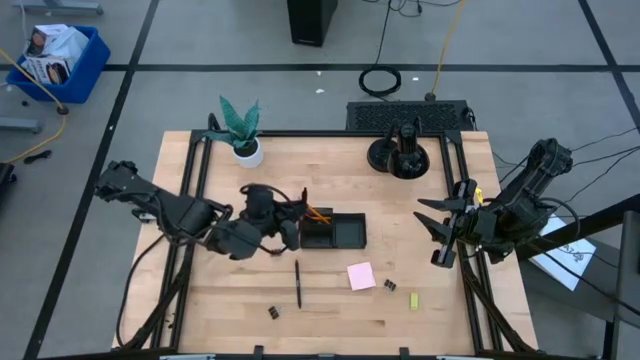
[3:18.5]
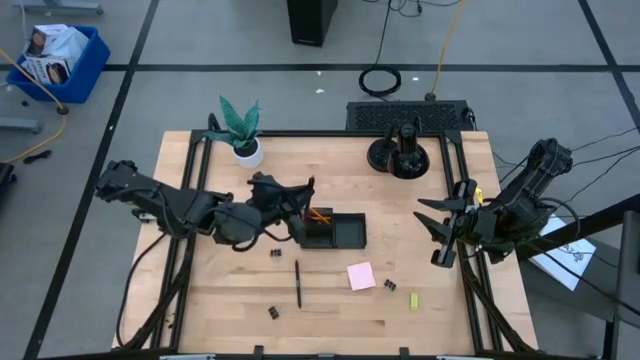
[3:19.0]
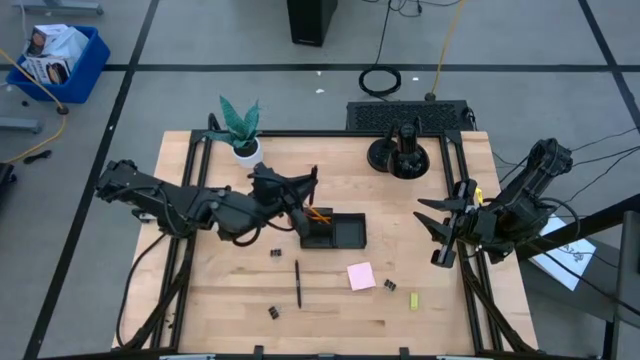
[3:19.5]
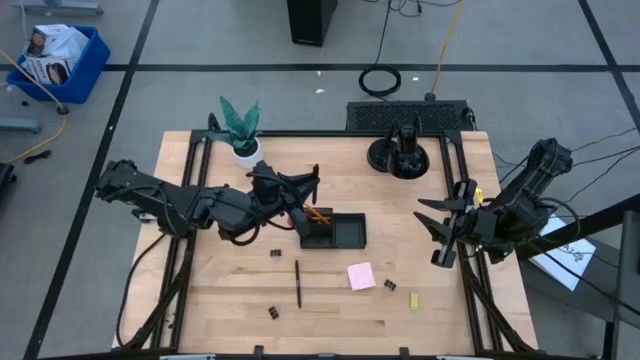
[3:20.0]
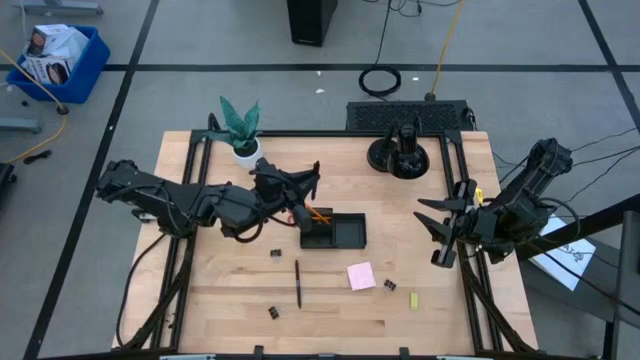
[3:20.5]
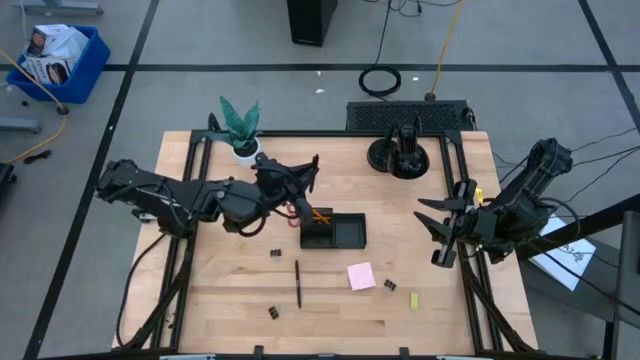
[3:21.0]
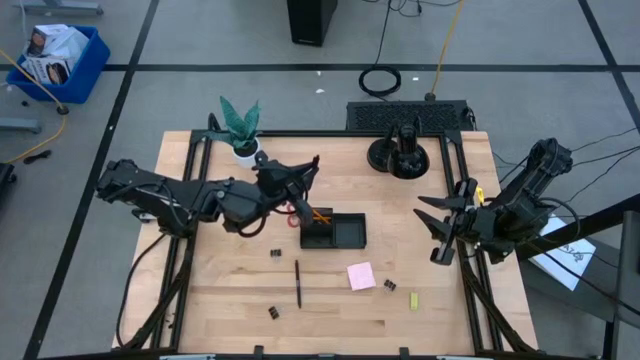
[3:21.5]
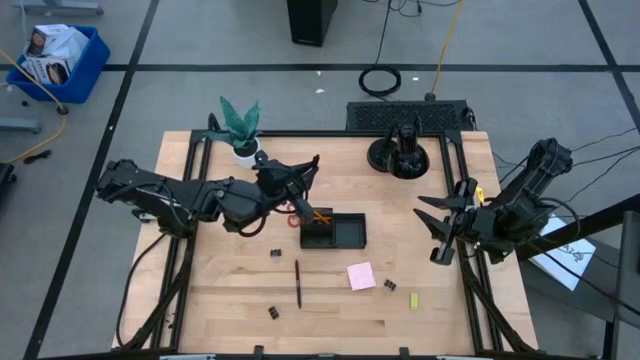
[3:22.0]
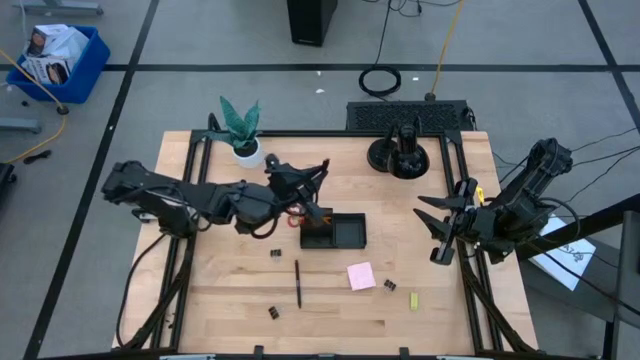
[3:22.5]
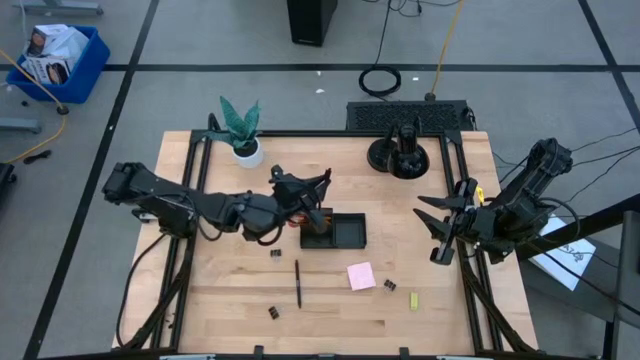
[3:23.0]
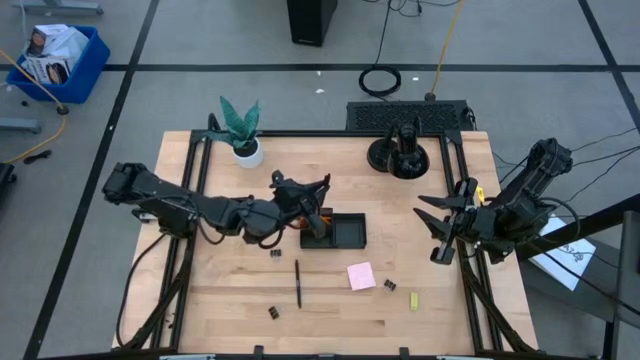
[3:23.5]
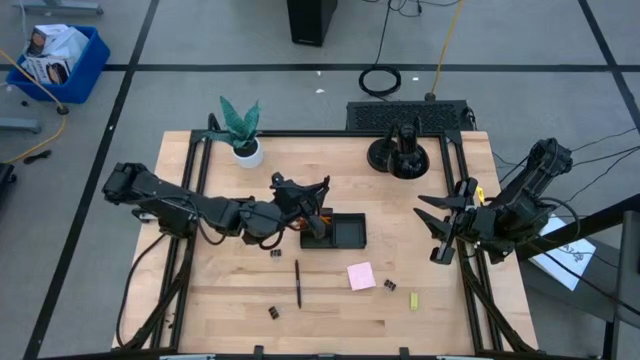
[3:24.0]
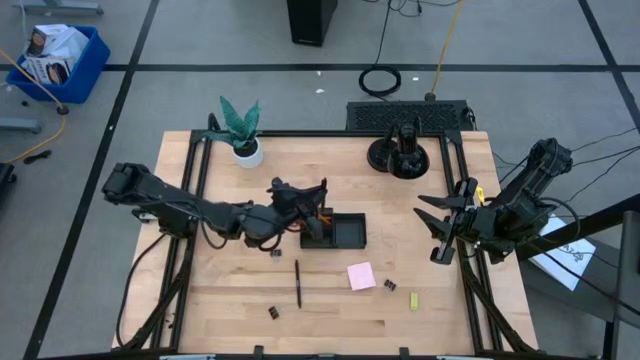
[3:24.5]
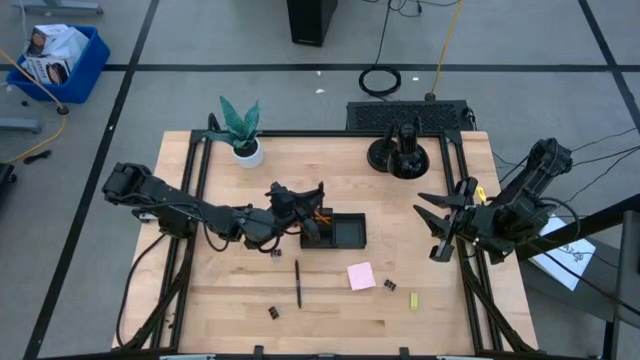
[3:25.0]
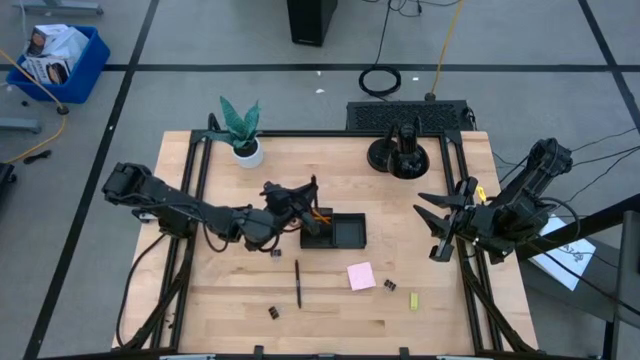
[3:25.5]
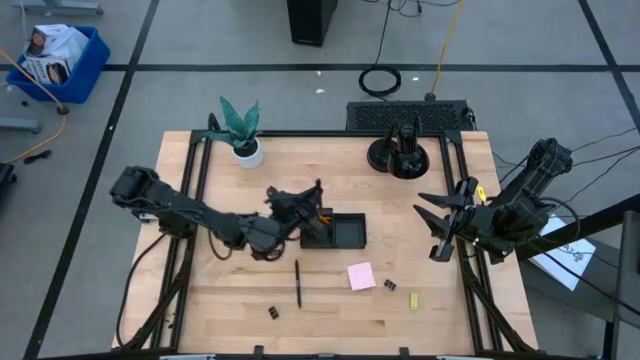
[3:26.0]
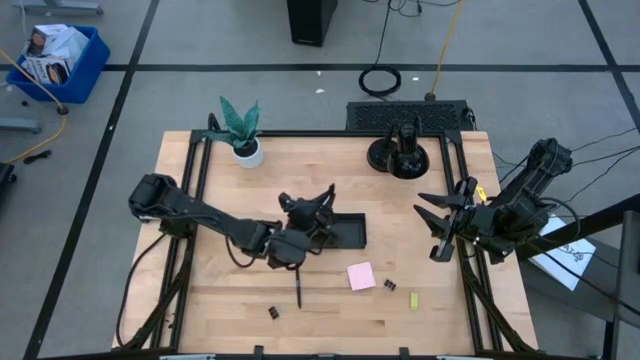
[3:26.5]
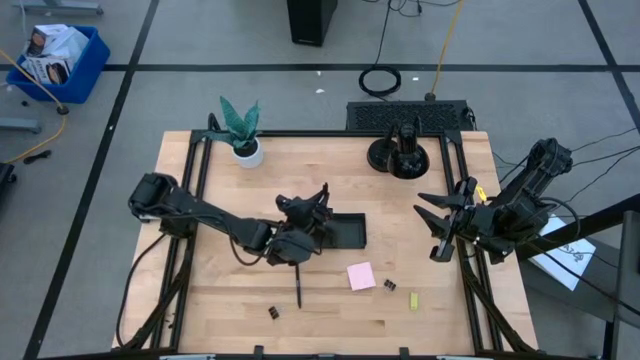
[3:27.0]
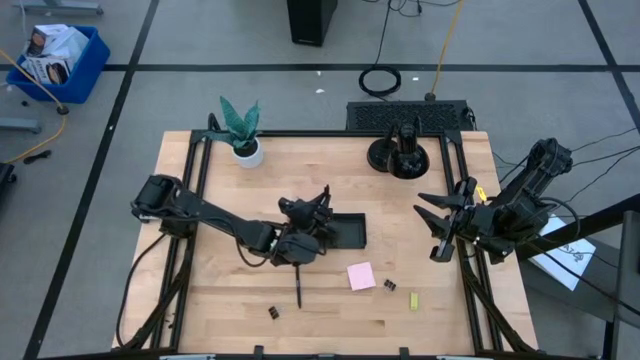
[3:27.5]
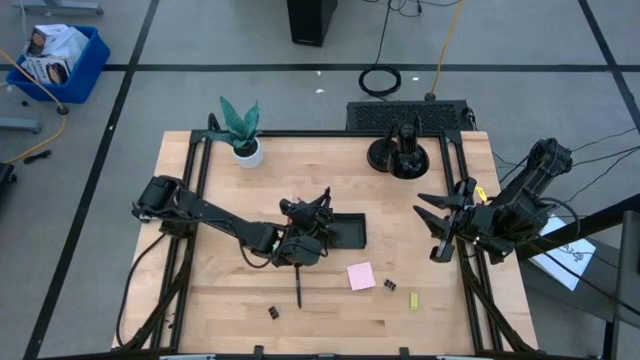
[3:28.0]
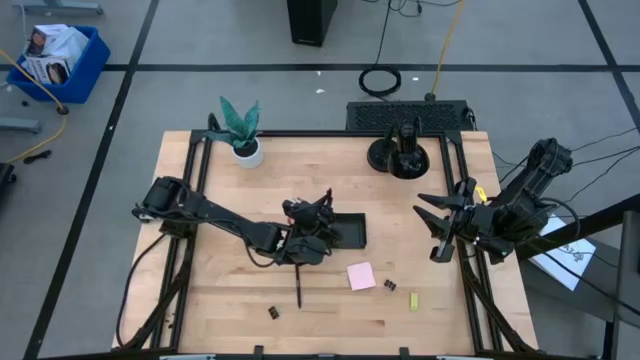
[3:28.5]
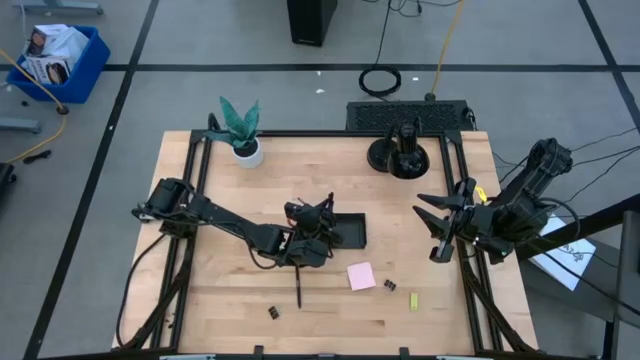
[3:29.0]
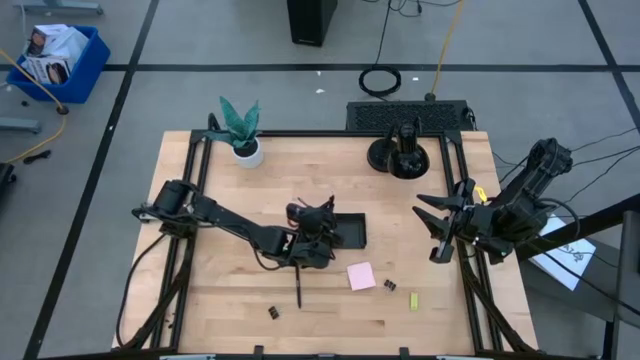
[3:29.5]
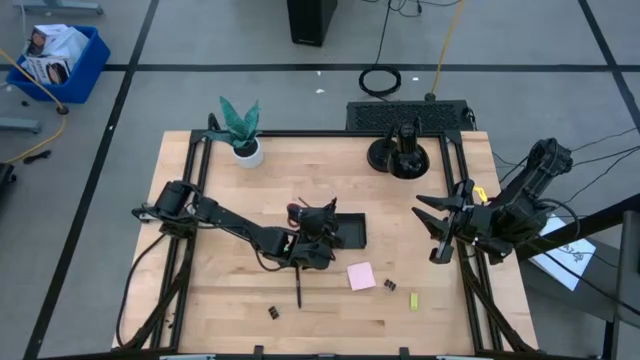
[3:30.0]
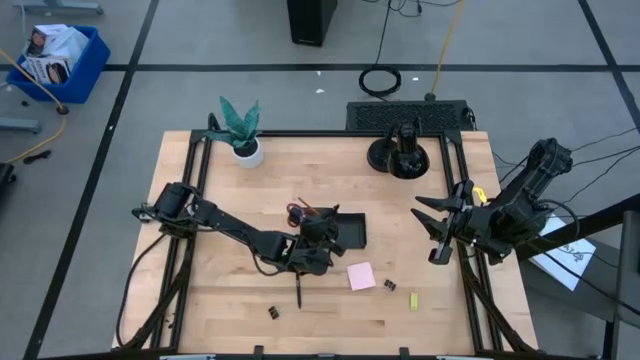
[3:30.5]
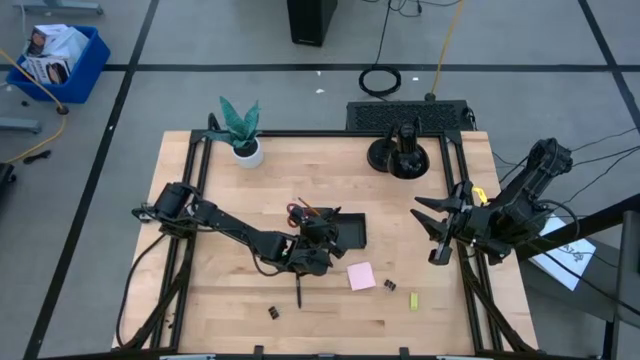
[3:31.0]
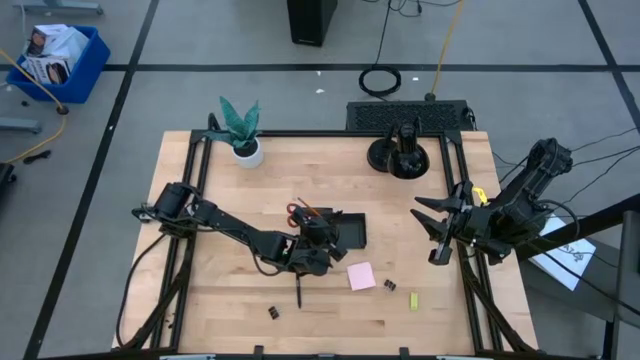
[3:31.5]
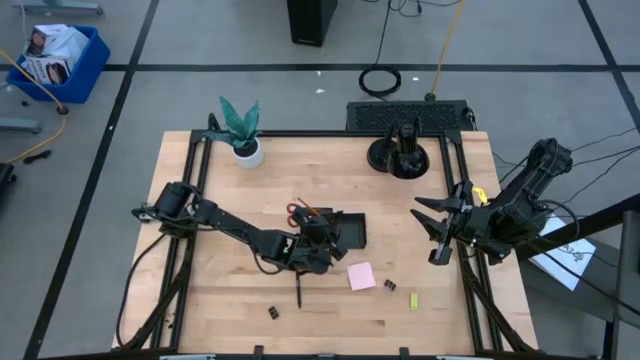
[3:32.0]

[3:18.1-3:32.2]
Task: Pick and place office supplies into organizer
Put the left black pen into the desk organizer

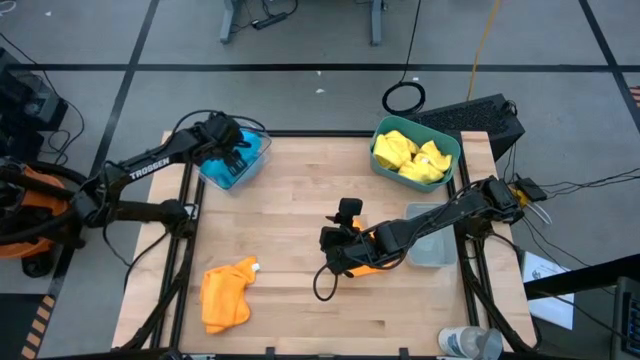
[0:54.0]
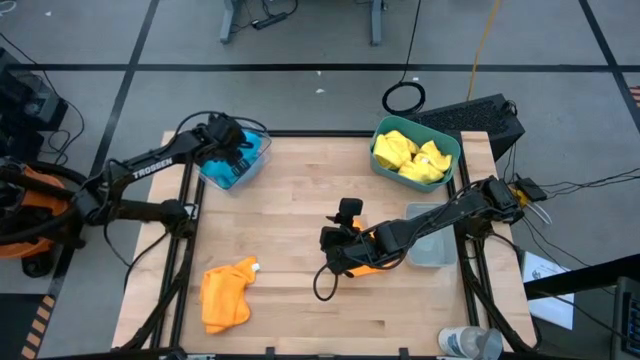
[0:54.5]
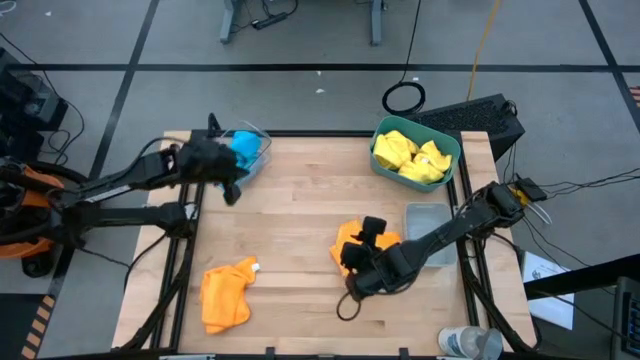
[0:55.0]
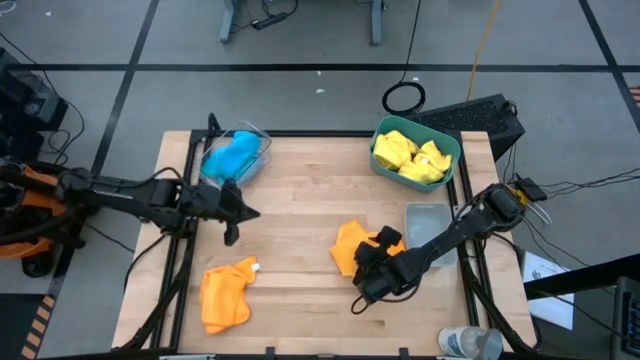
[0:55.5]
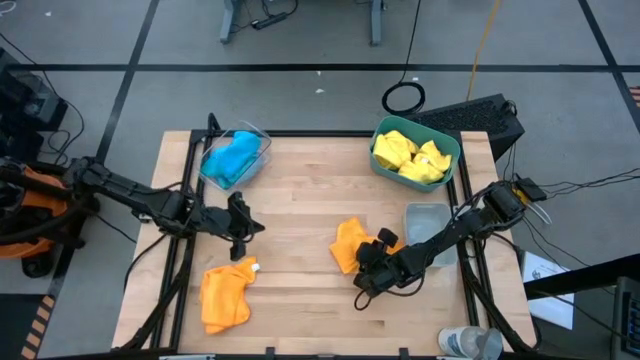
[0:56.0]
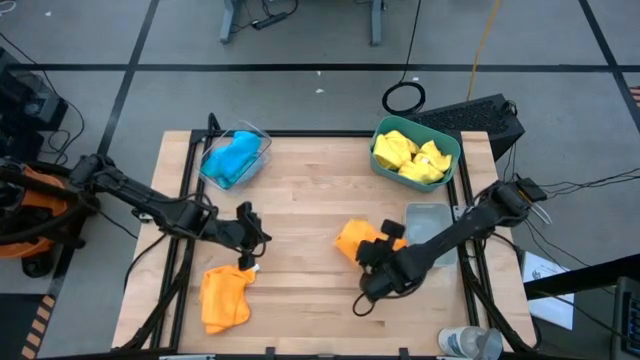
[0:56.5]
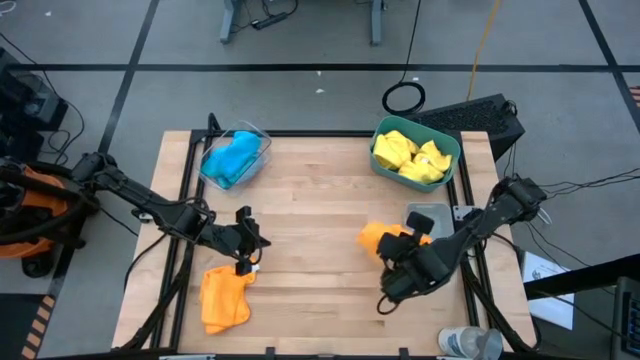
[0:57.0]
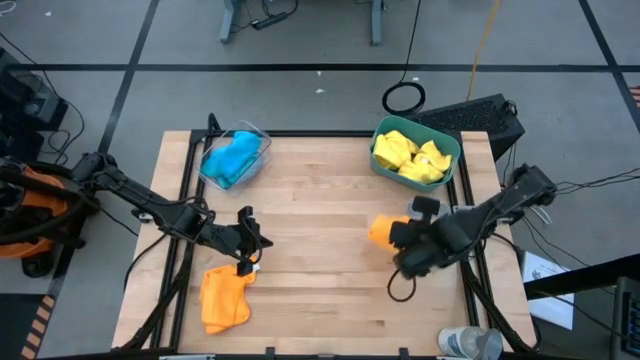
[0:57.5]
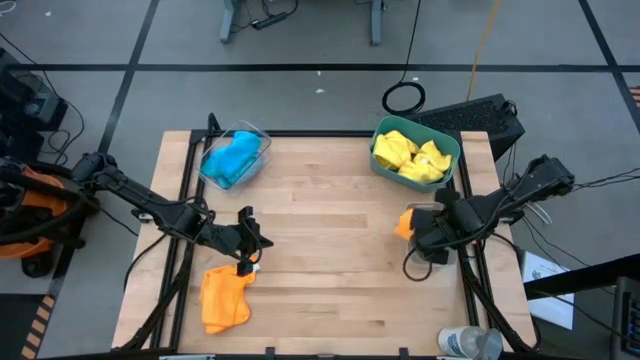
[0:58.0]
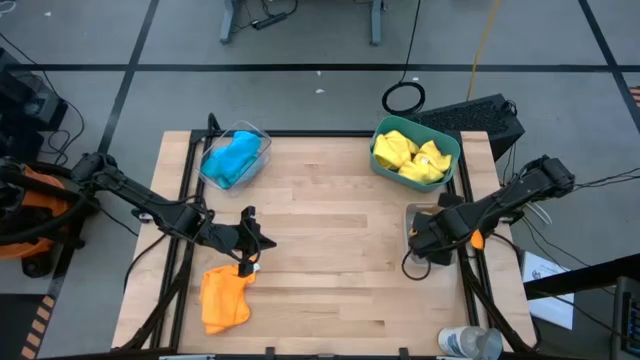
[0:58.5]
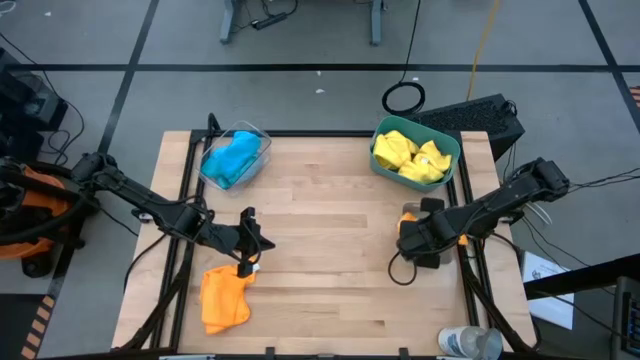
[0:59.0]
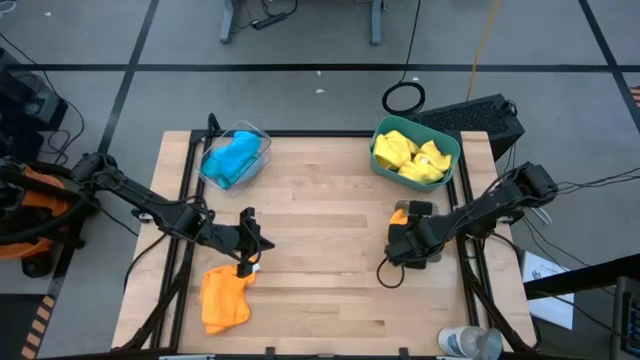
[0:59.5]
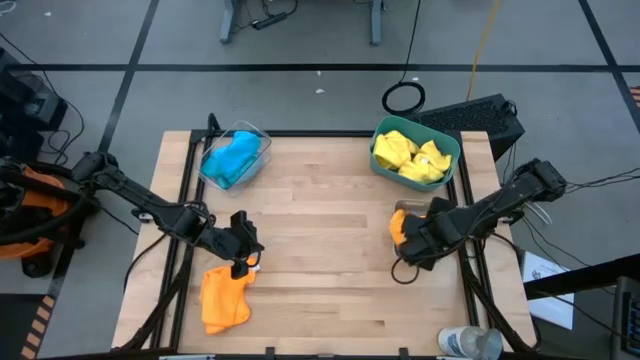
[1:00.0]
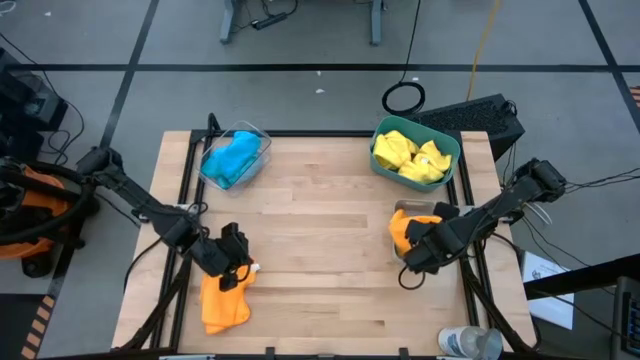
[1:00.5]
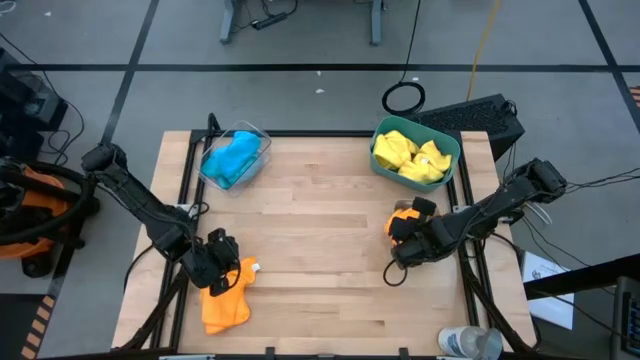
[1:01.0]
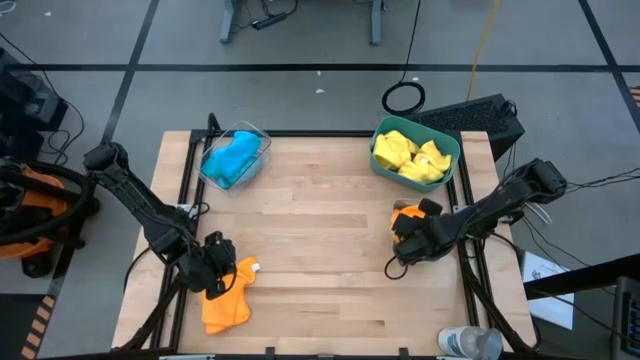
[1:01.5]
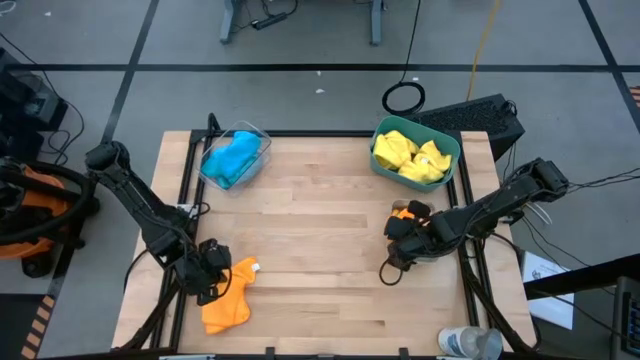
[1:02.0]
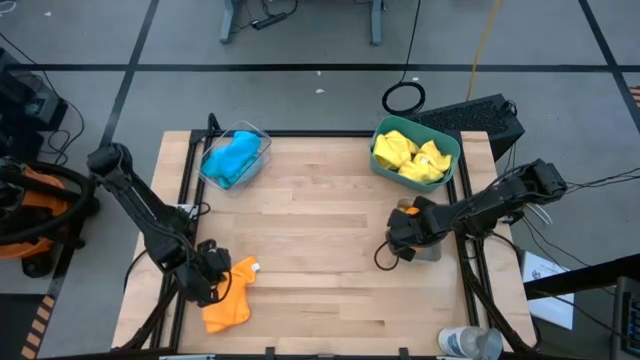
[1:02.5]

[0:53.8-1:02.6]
Task: Sort microfiber towel by color & place in baskets
Put the right orange towel into the grey bin
